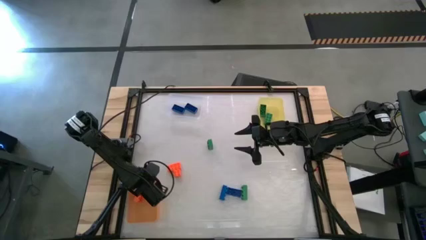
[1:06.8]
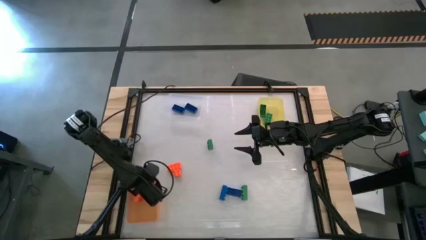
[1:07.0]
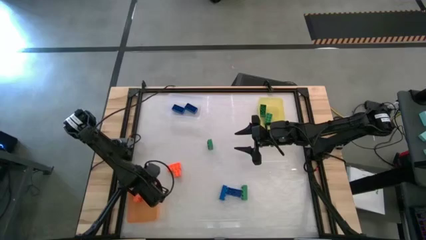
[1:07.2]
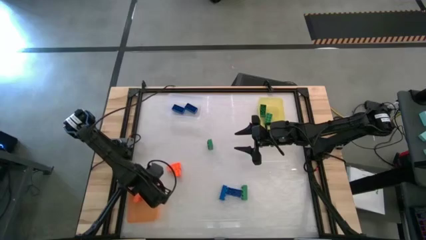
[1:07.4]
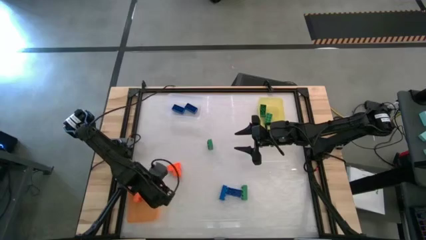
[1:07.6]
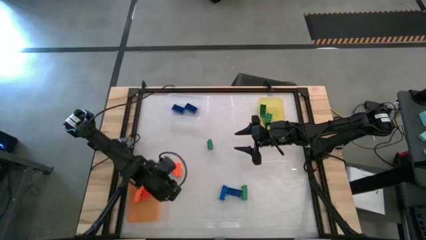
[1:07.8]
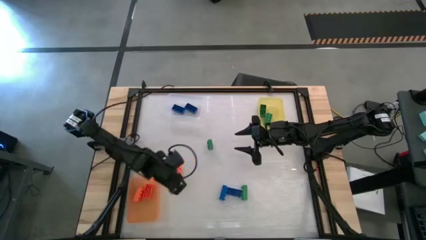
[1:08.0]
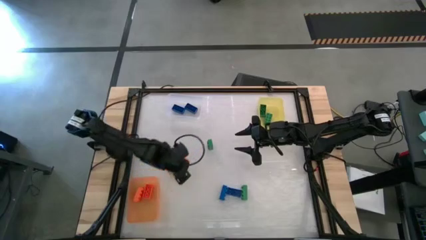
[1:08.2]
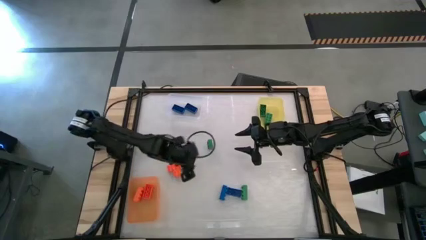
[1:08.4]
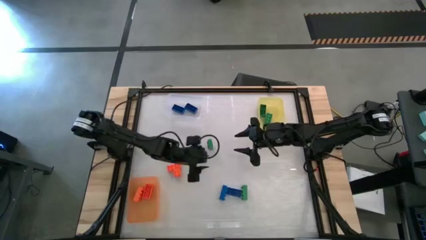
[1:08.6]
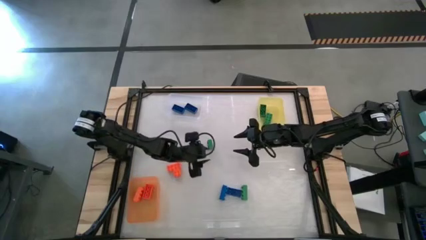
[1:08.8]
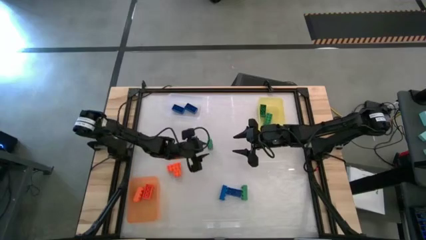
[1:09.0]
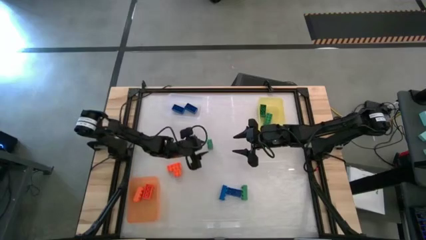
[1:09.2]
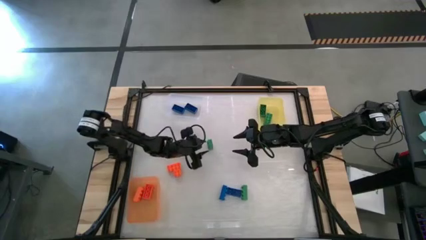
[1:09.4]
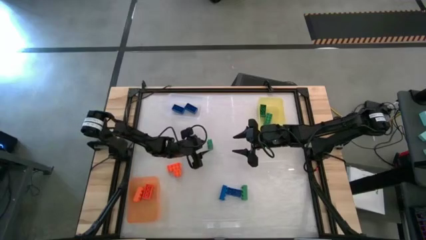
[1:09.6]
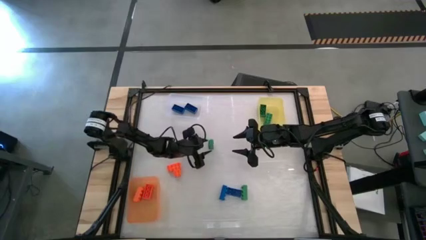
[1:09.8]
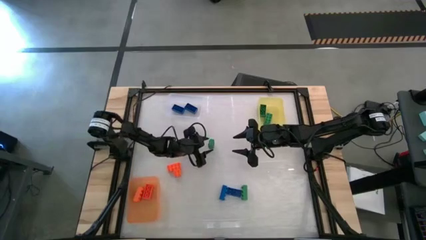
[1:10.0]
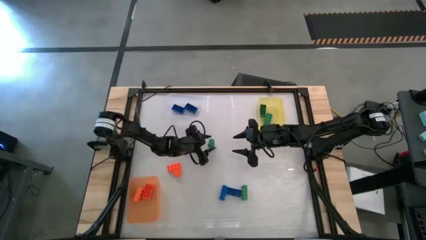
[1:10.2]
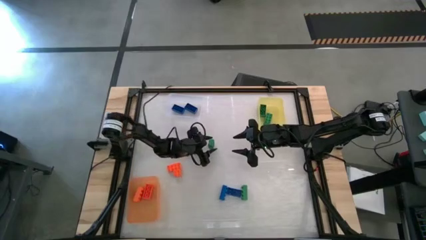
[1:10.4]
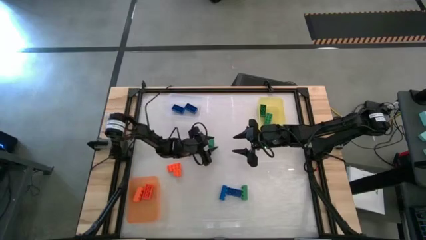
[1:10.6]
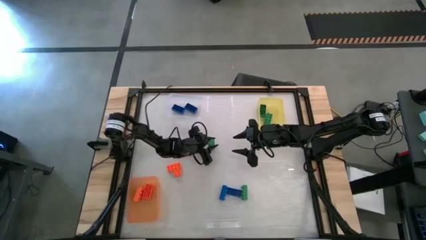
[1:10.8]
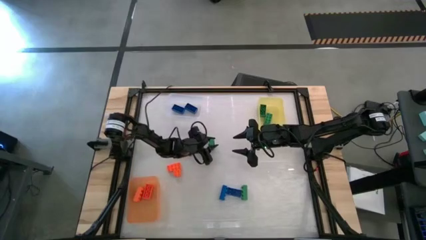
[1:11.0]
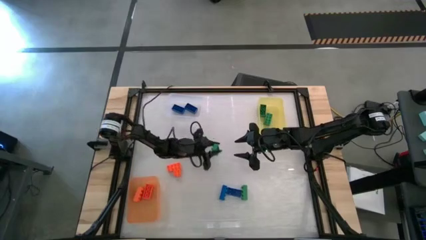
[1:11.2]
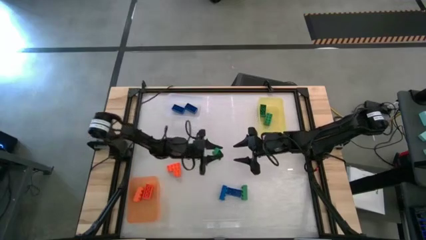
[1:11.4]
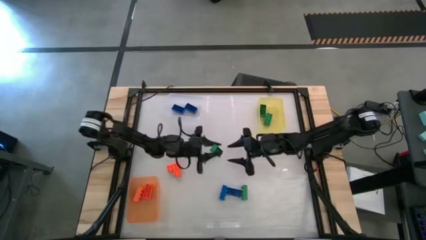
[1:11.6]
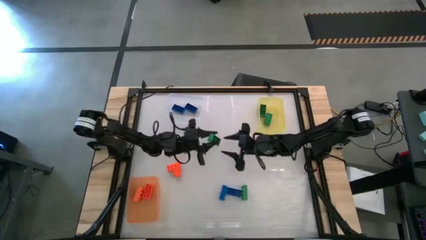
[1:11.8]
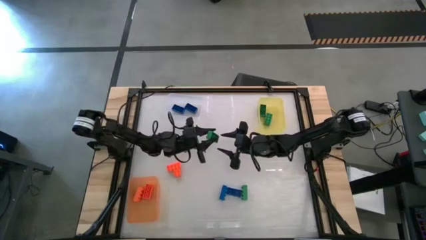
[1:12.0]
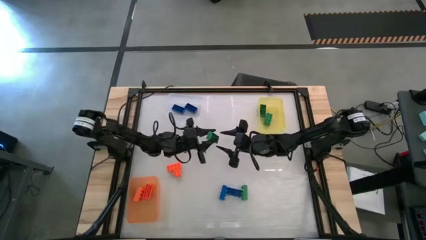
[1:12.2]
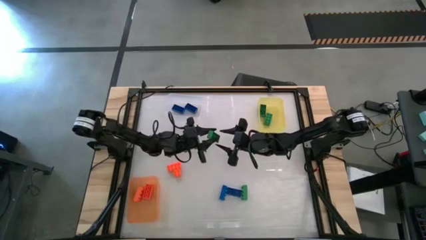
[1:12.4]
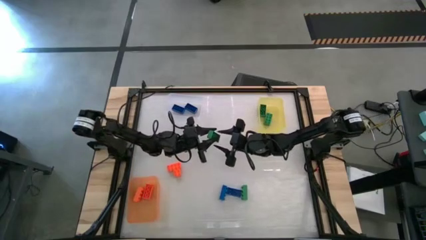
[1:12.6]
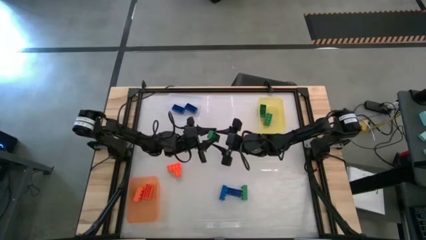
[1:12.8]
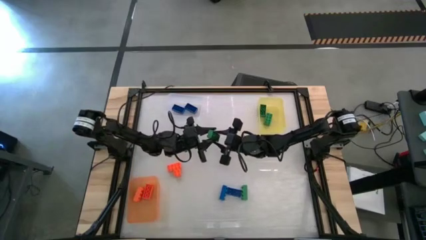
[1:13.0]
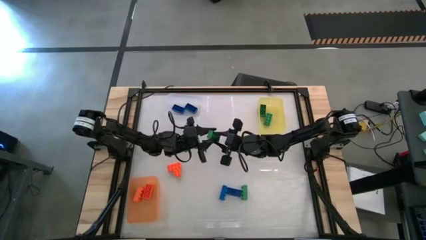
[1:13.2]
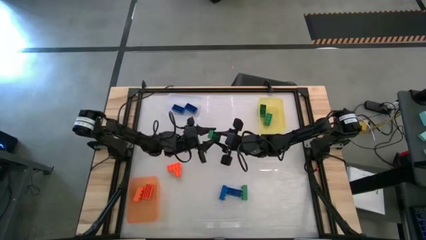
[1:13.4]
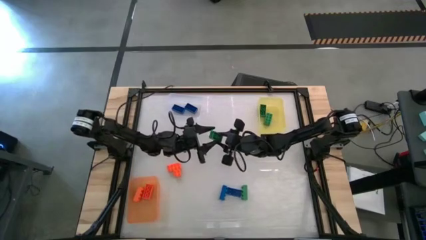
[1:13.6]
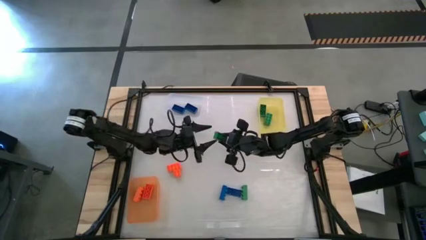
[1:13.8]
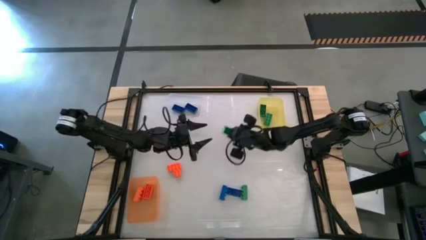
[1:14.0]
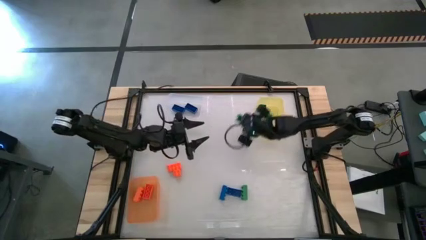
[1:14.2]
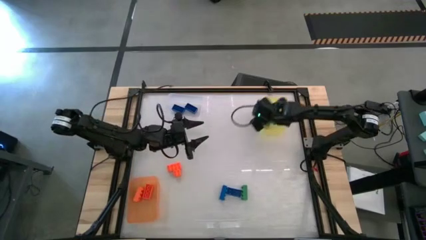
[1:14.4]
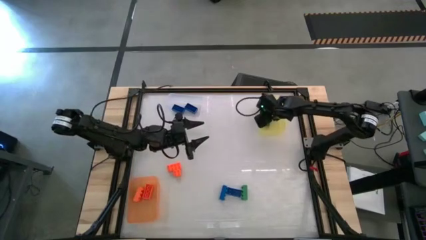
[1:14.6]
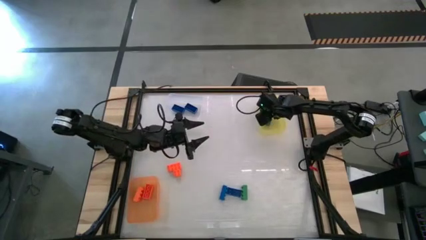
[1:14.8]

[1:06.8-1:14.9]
Task: Sort & place blocks by color
Put the green game piece into the yellow bin

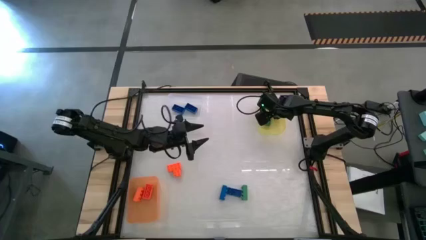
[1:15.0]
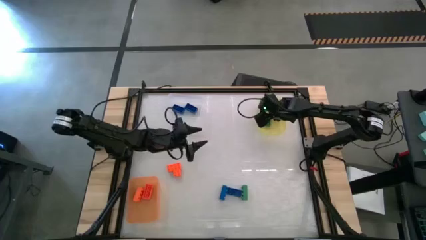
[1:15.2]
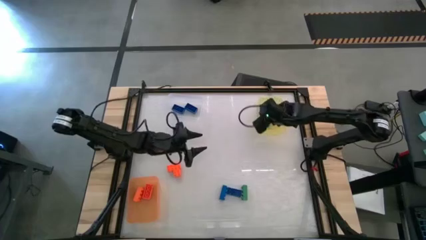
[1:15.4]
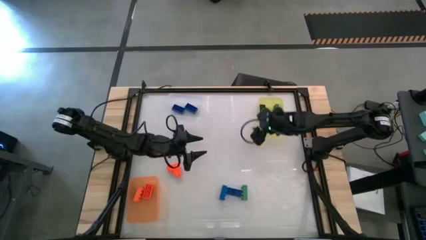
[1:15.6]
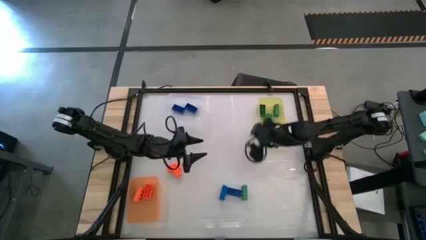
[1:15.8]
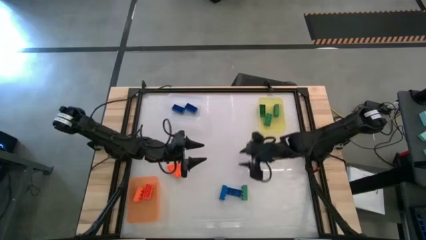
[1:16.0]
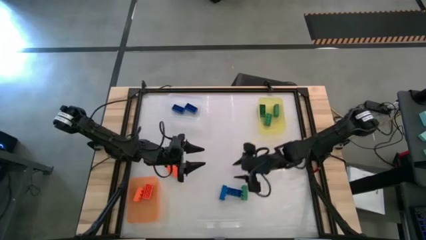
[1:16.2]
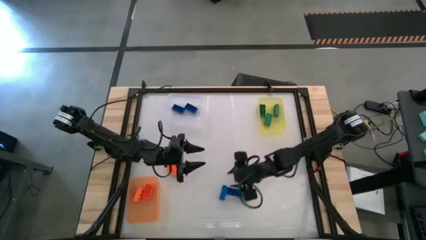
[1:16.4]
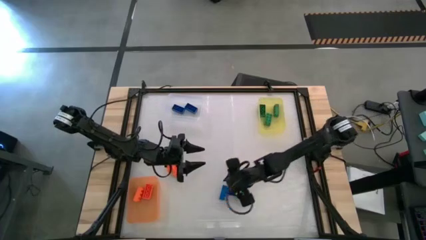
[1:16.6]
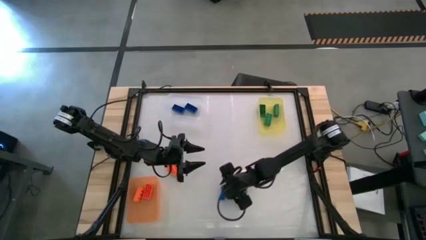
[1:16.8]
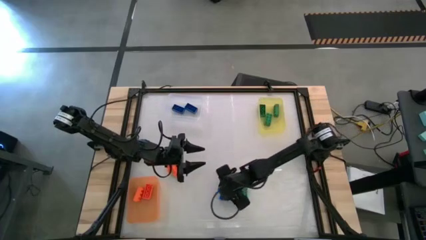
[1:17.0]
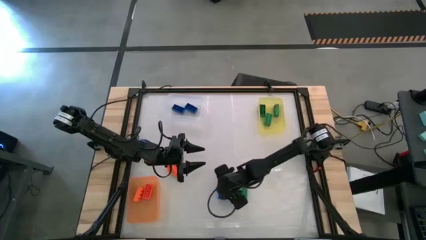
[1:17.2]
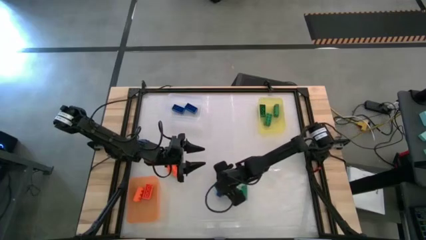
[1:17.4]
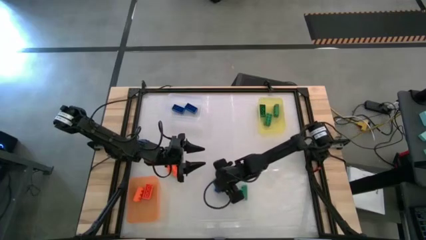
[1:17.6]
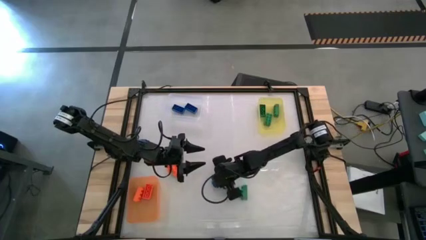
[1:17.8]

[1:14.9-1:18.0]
Put the blue game piece into the transparent bin

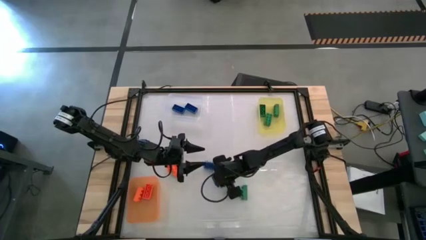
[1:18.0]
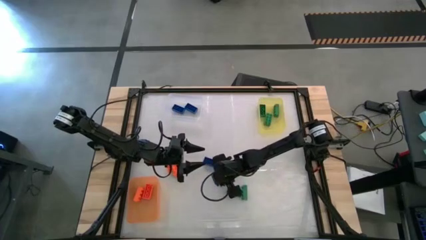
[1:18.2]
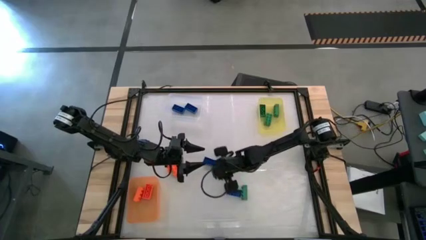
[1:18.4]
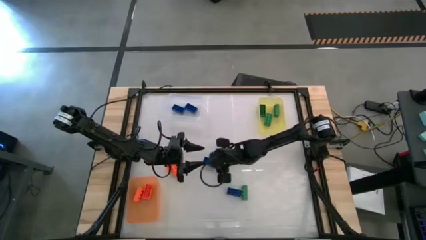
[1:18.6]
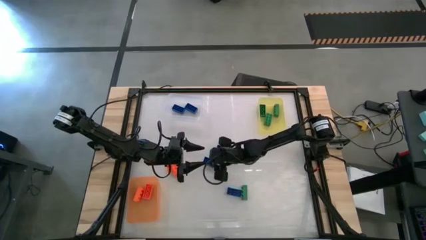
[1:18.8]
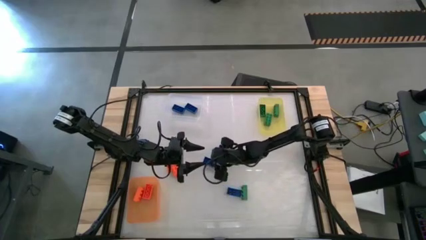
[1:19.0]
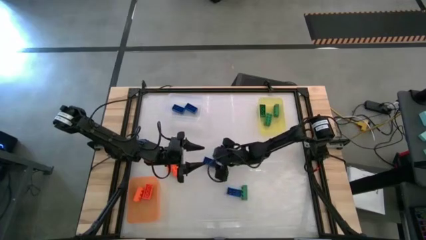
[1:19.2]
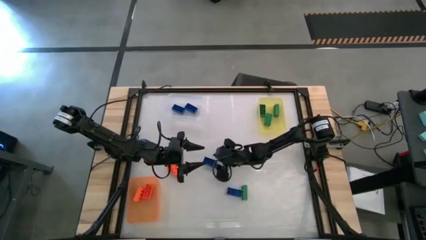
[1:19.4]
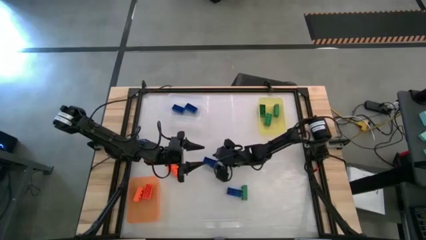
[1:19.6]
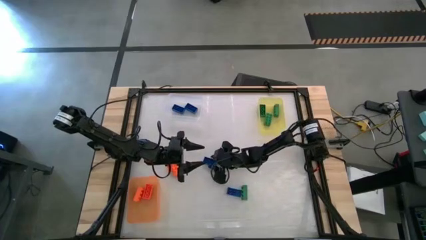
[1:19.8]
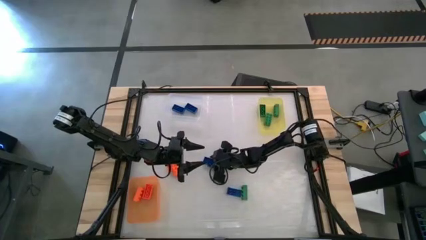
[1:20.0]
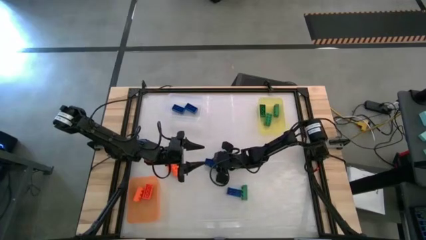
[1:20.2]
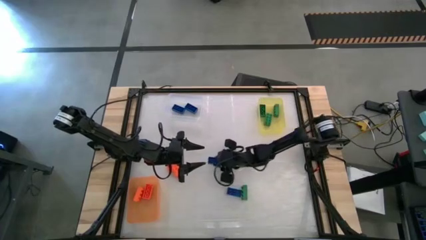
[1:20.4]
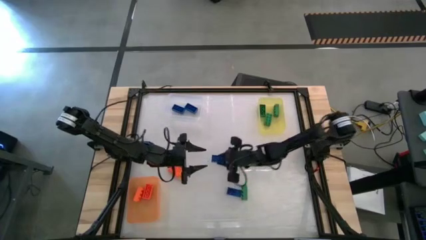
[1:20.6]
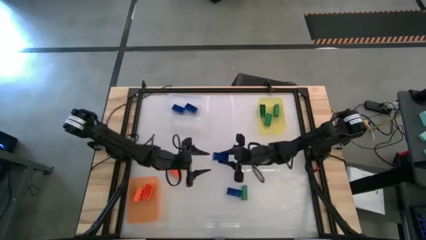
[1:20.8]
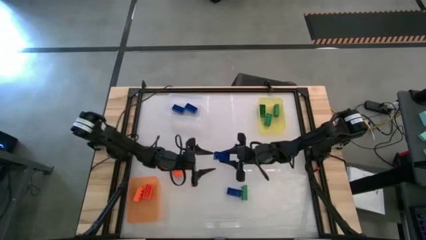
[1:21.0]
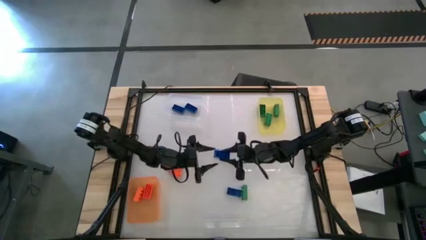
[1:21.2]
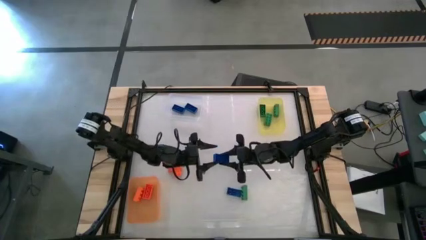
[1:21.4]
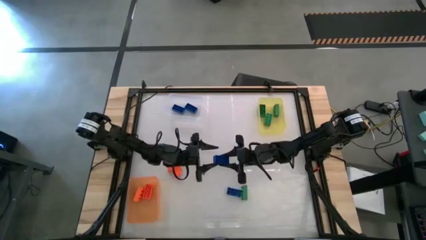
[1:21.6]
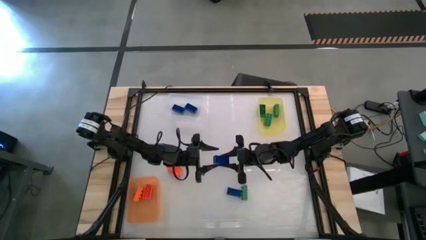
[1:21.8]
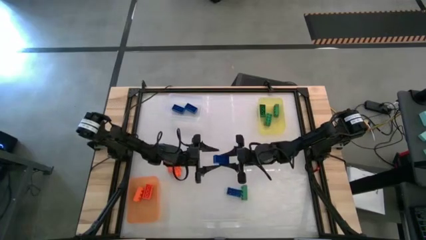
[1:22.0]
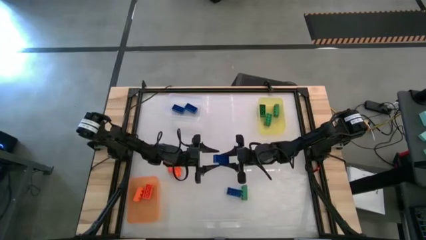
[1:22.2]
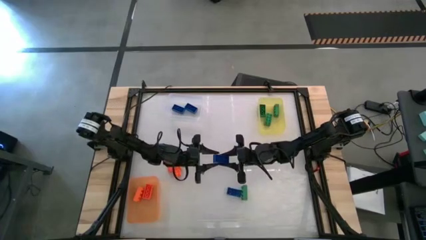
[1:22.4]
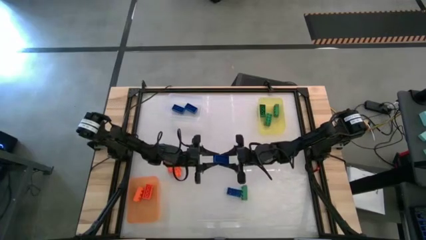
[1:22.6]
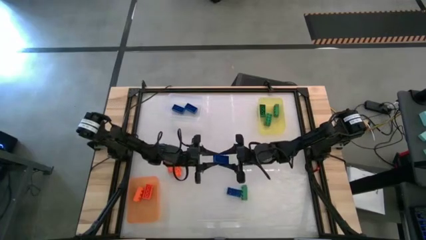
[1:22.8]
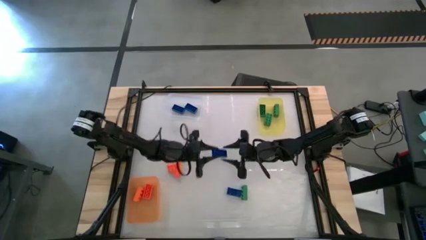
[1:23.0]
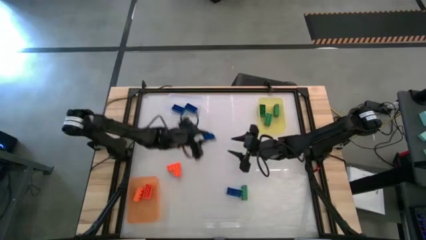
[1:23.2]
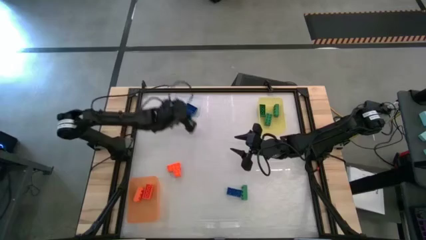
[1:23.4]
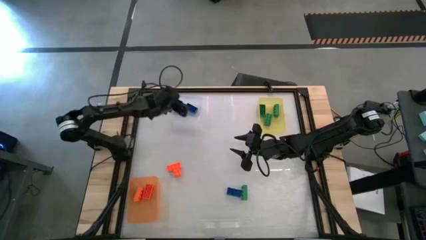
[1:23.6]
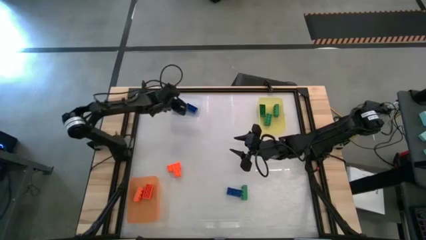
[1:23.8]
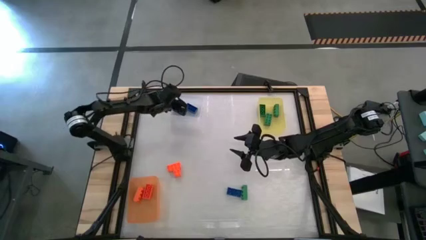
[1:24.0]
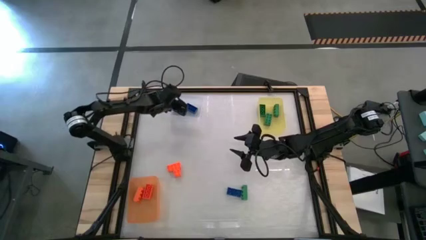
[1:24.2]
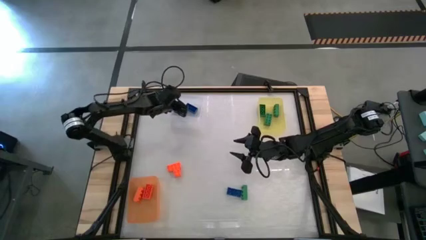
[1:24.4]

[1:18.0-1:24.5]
Put the blue game piece into the transparent bin
